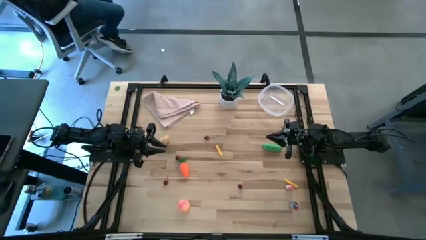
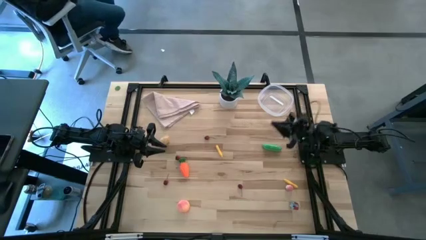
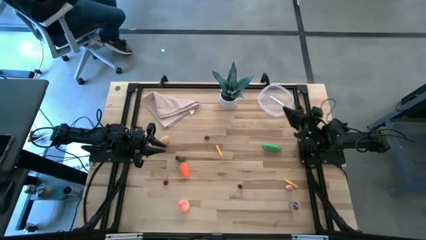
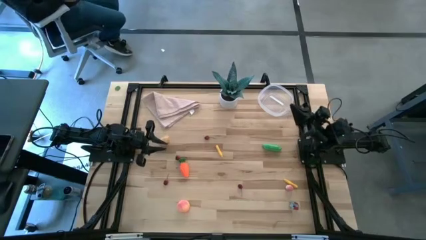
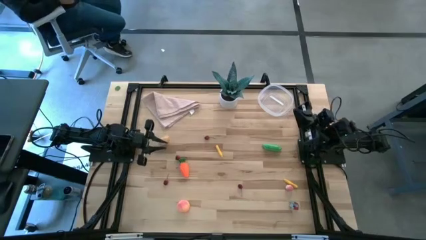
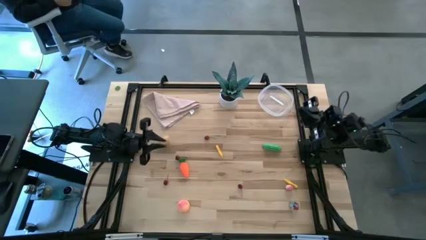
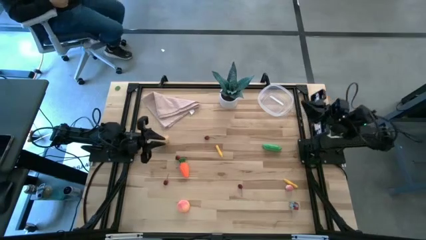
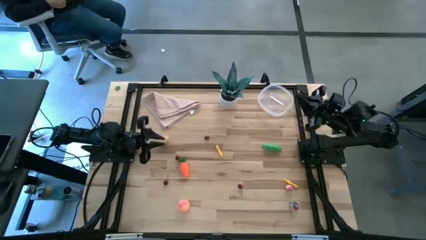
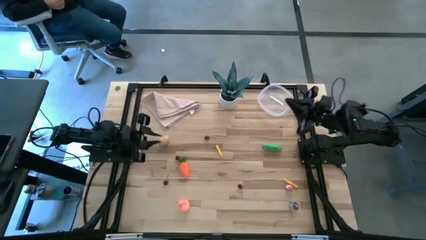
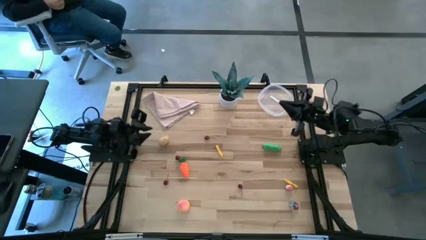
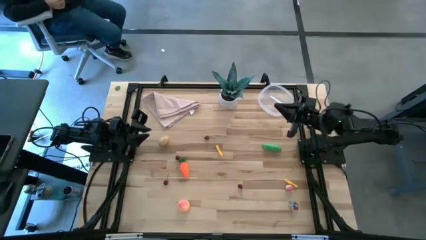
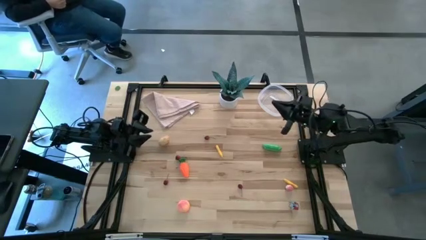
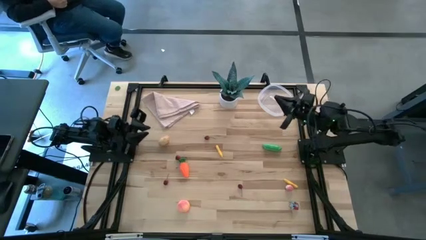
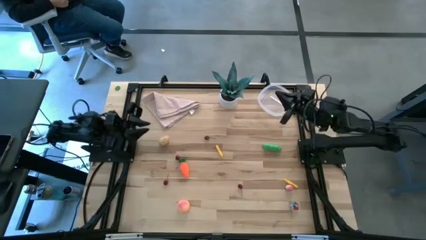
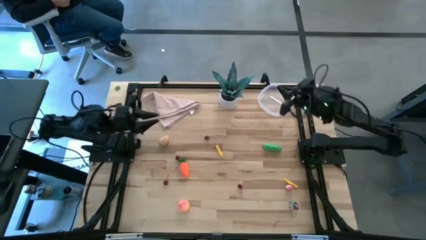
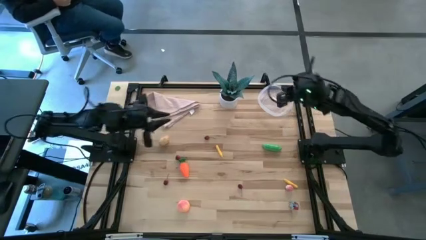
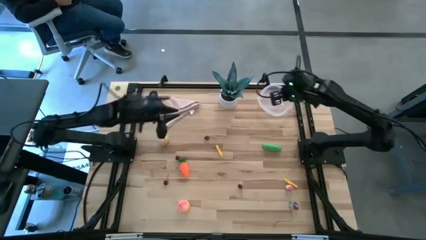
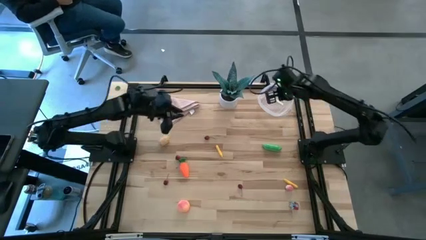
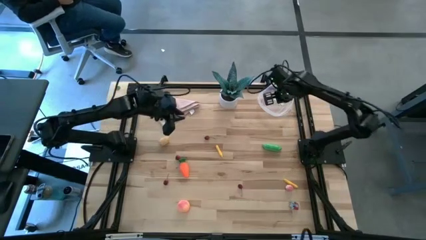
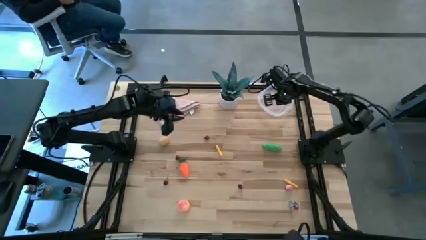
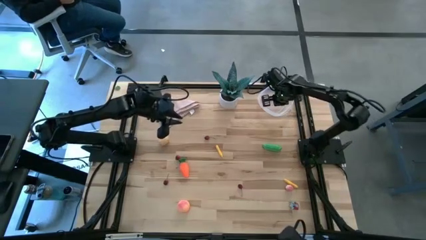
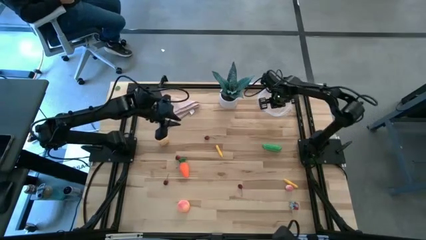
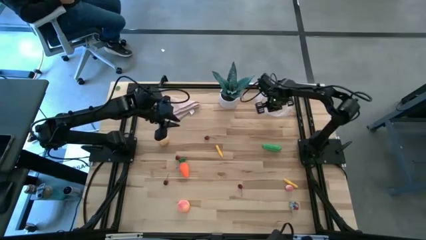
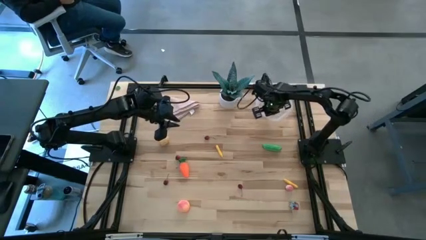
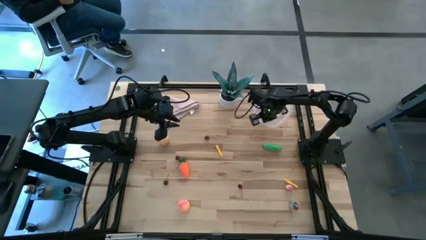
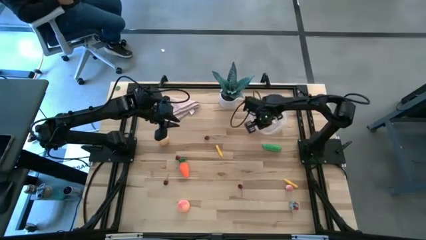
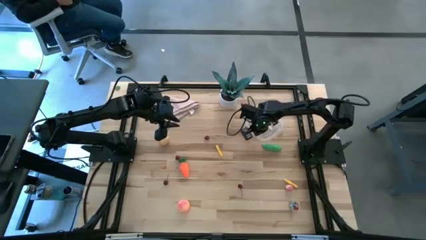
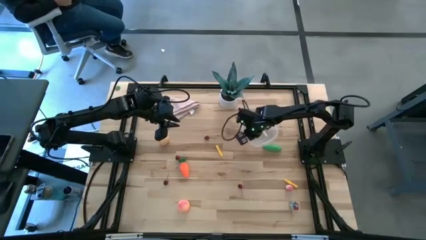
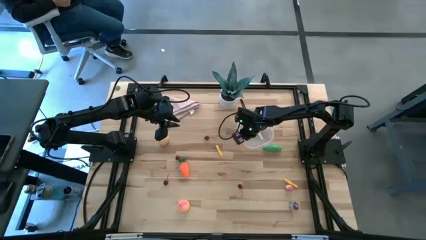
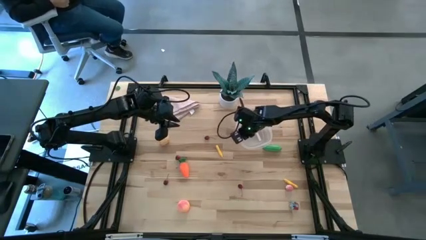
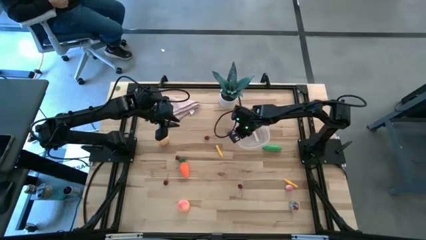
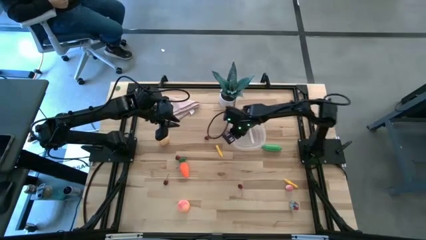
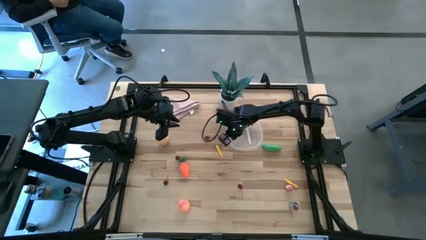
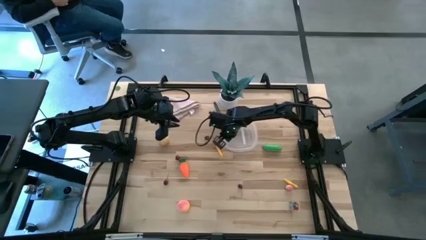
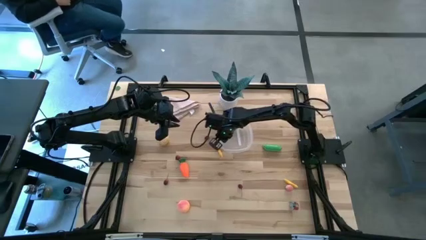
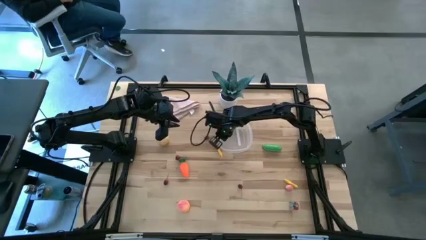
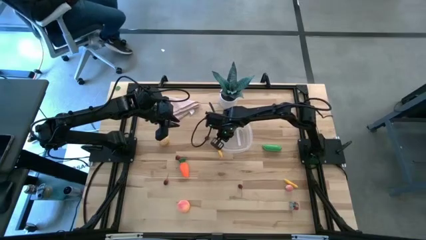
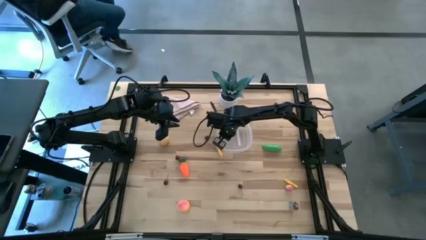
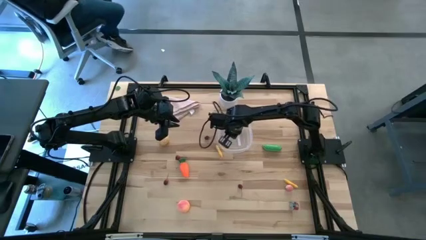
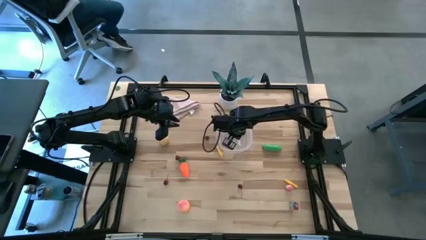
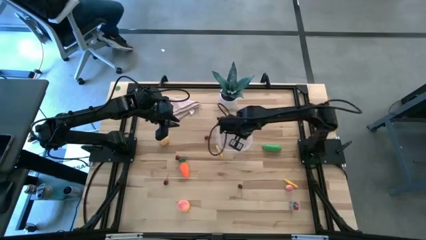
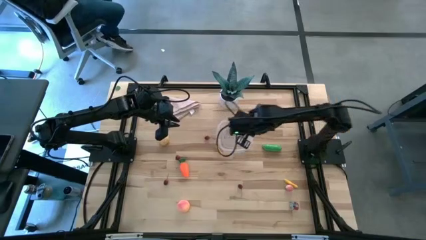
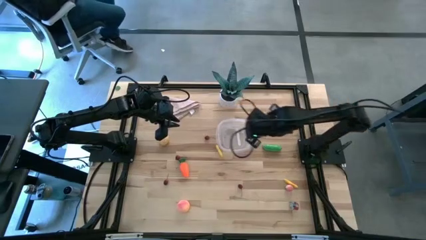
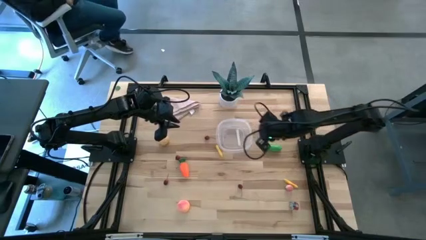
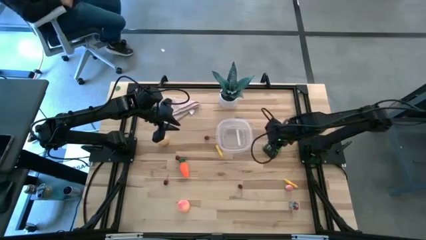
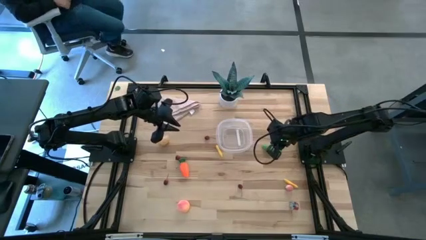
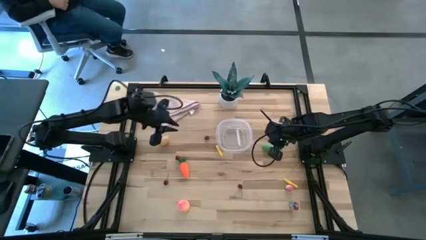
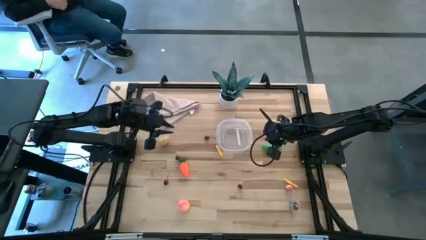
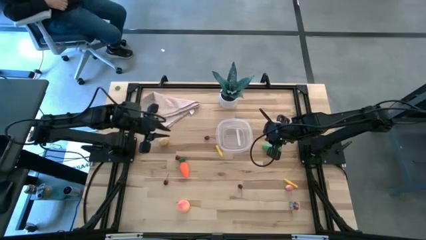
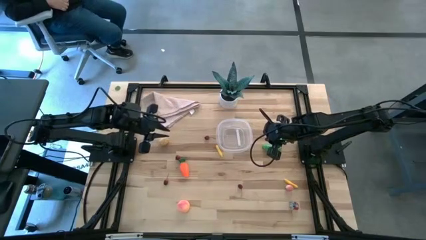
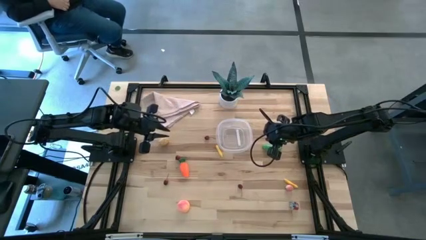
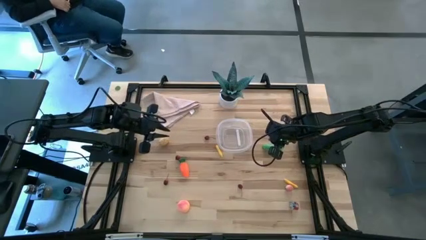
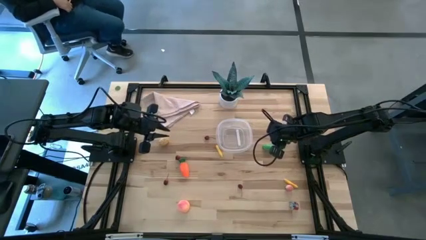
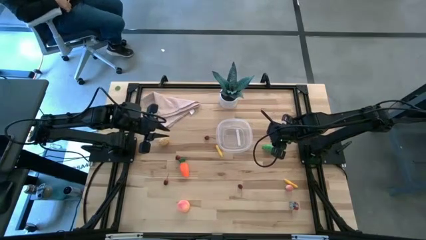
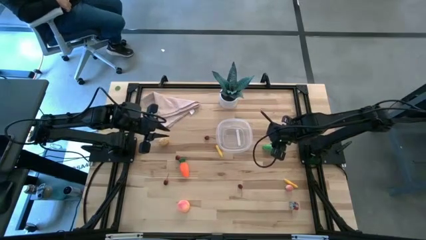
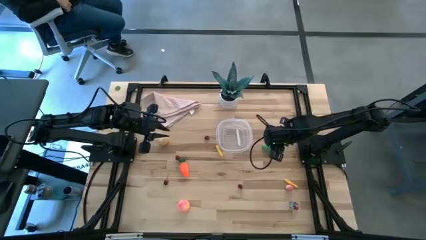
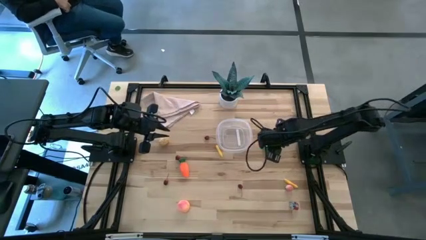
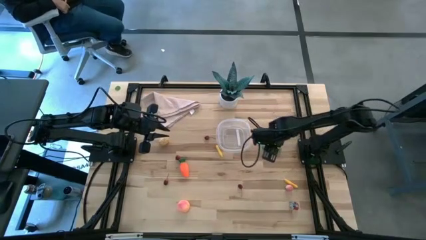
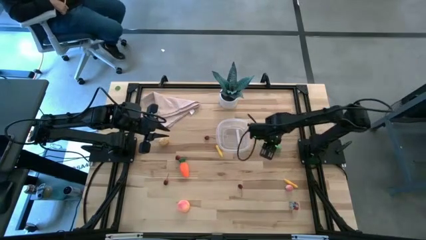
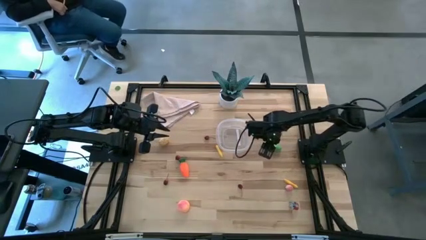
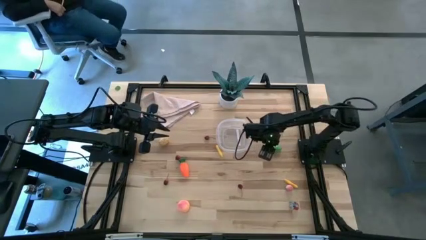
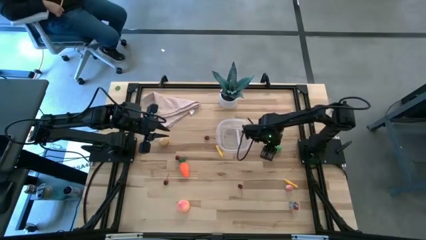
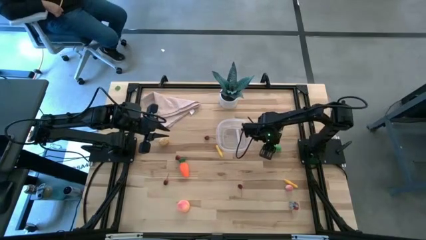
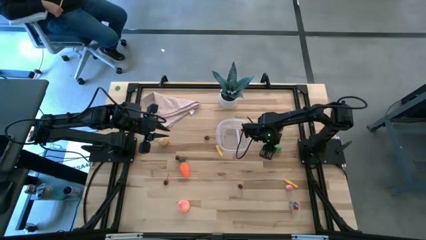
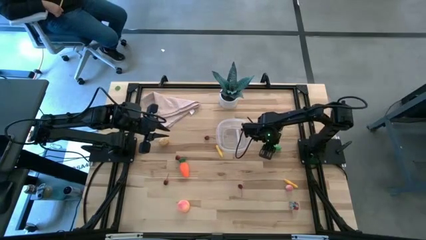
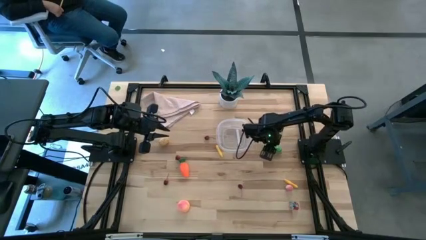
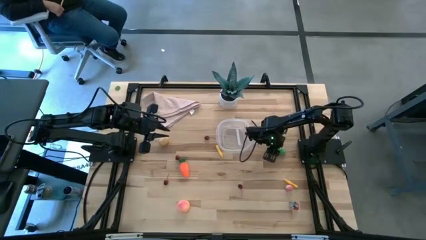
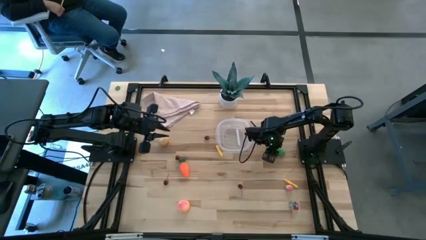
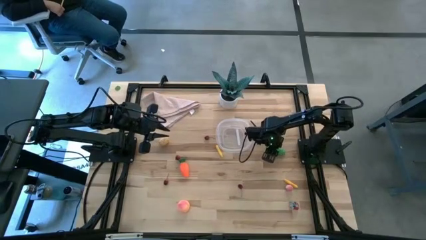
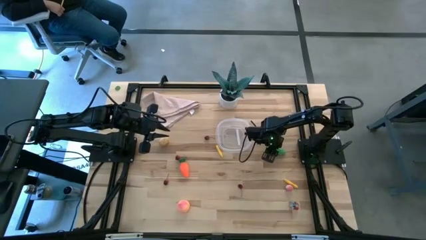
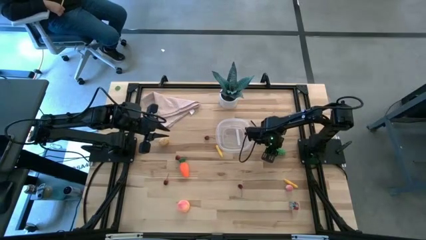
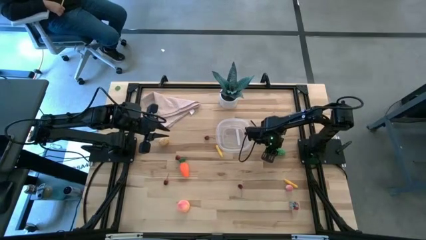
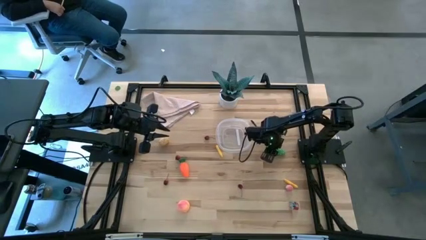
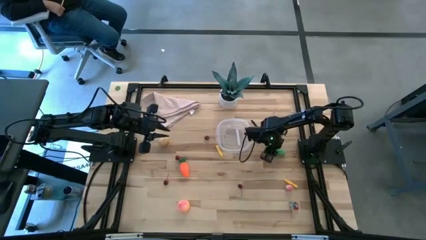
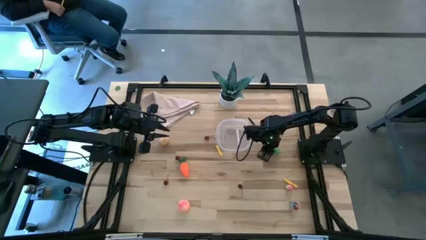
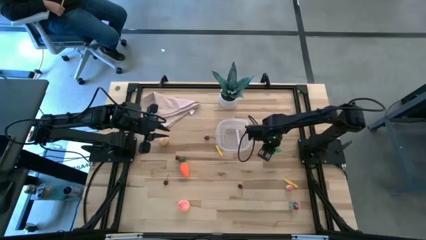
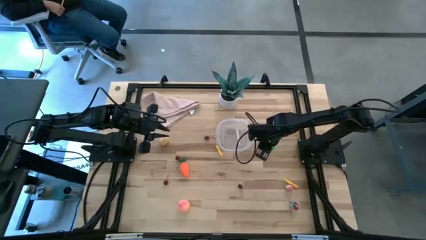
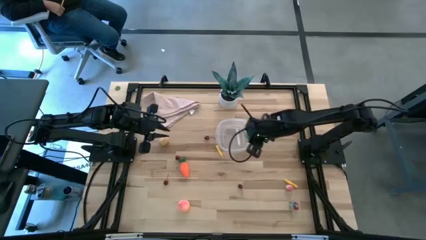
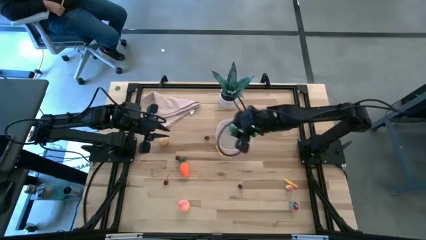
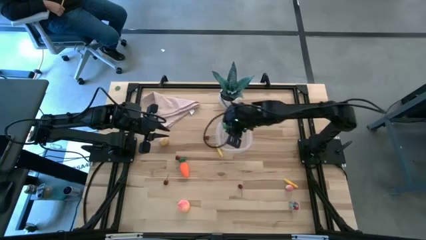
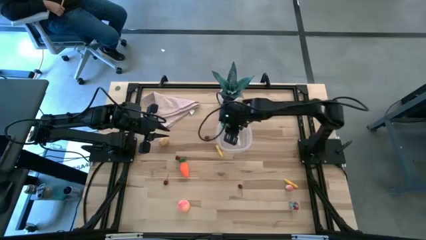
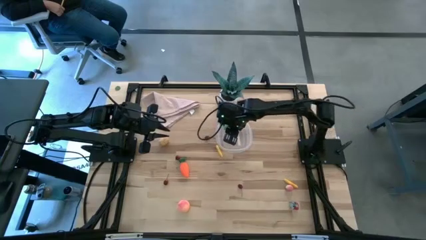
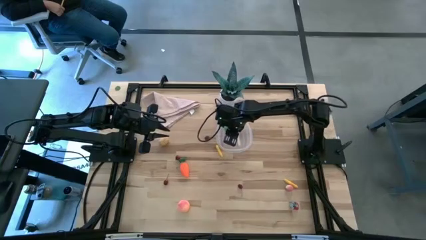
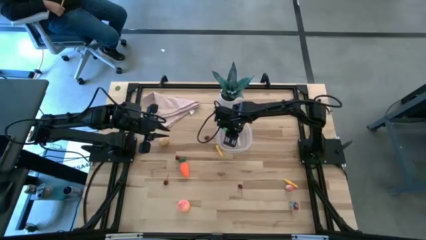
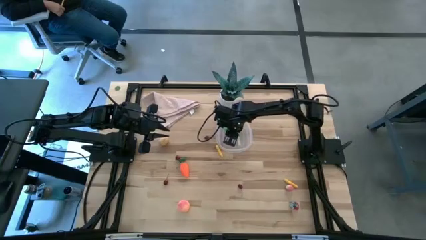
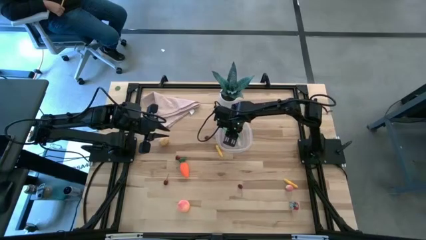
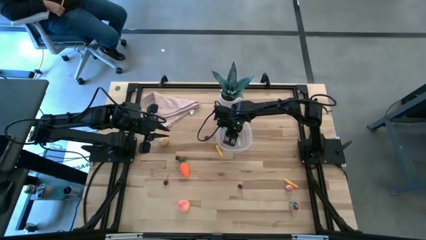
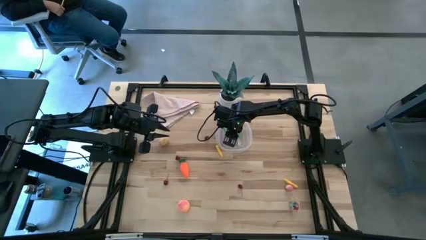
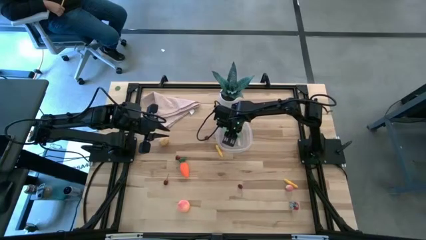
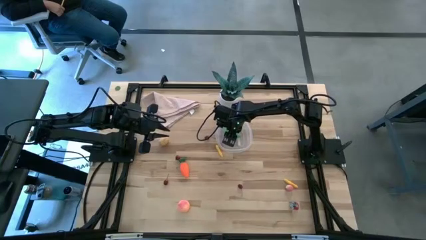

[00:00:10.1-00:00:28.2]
Task: Pick and placing Produce into tupperware
Put the green peas into the transparent bin
